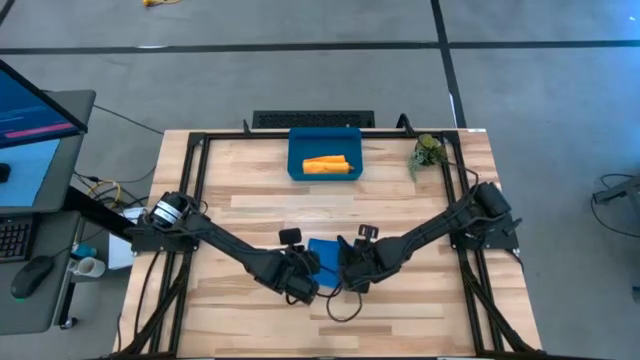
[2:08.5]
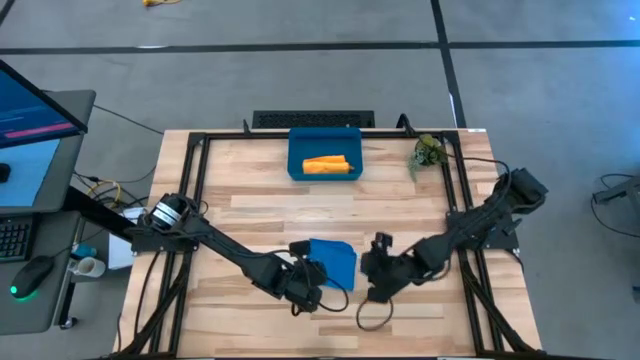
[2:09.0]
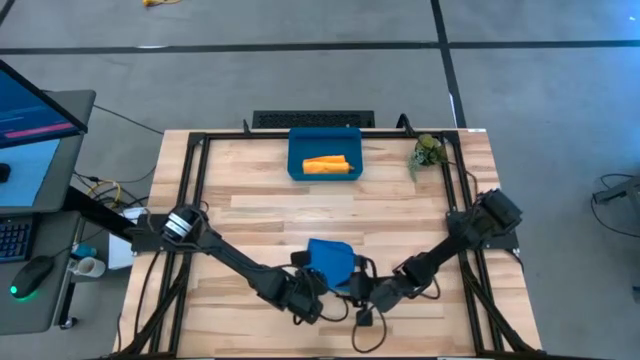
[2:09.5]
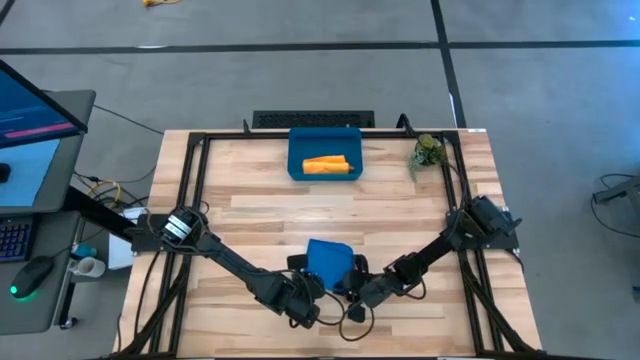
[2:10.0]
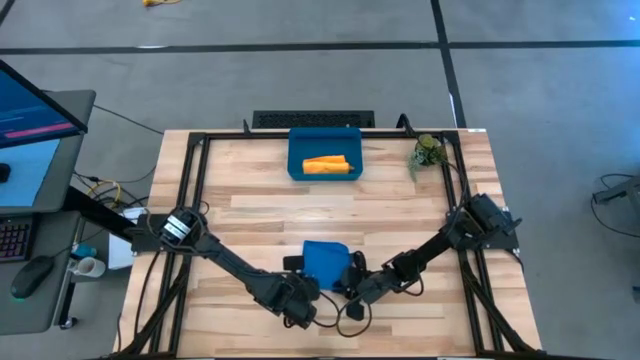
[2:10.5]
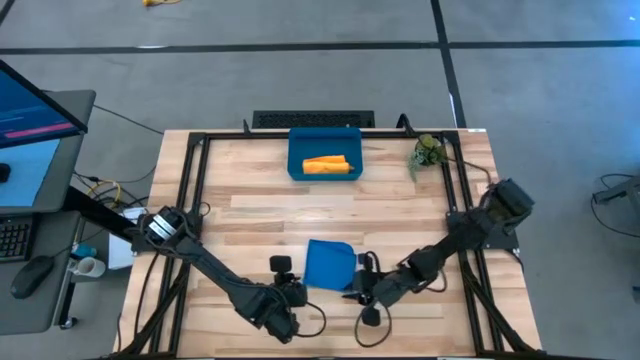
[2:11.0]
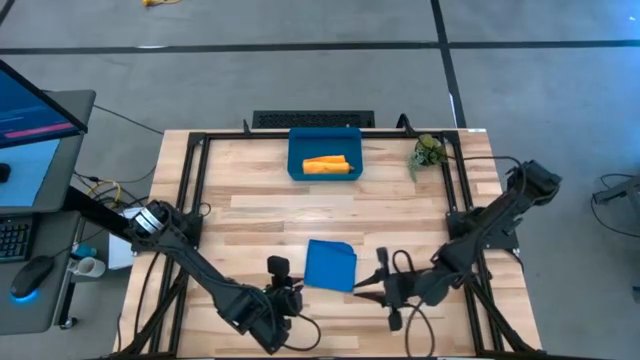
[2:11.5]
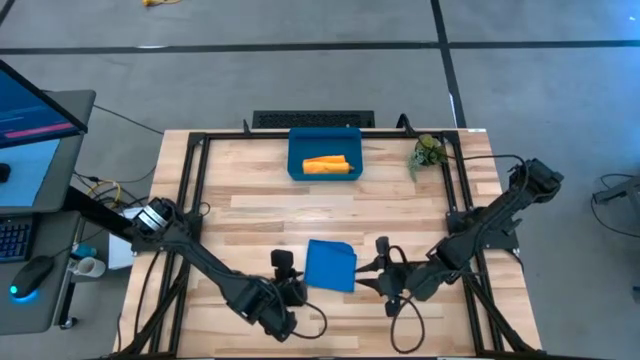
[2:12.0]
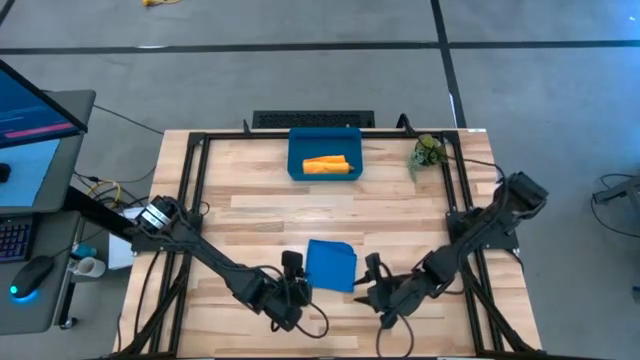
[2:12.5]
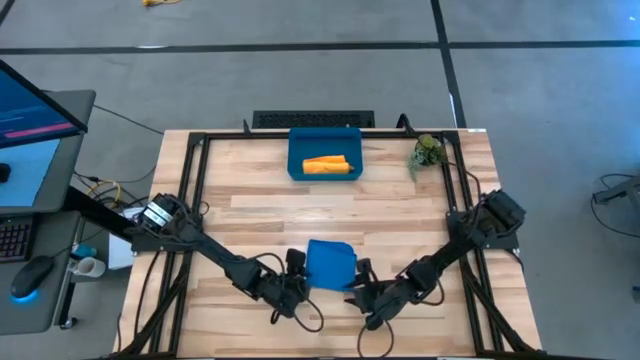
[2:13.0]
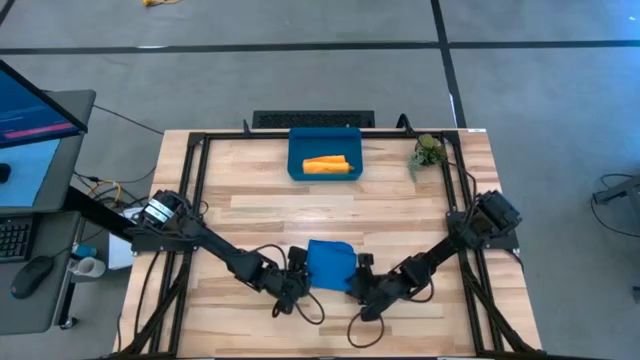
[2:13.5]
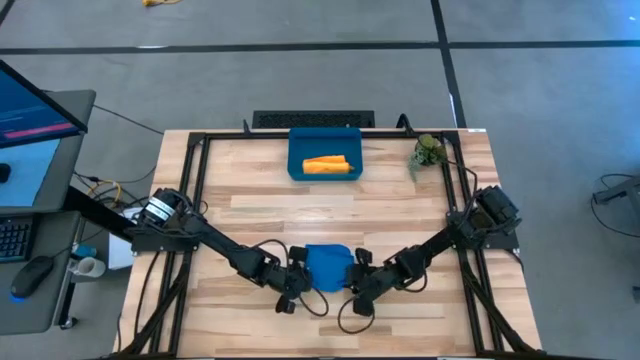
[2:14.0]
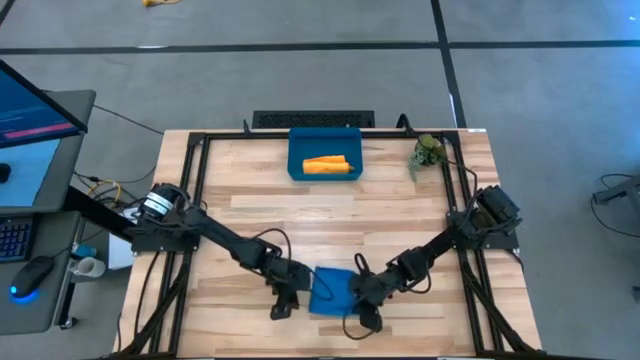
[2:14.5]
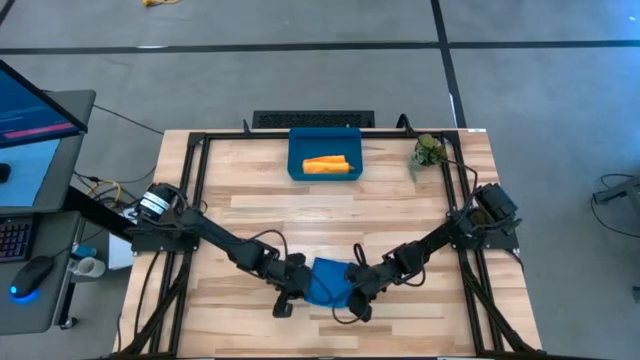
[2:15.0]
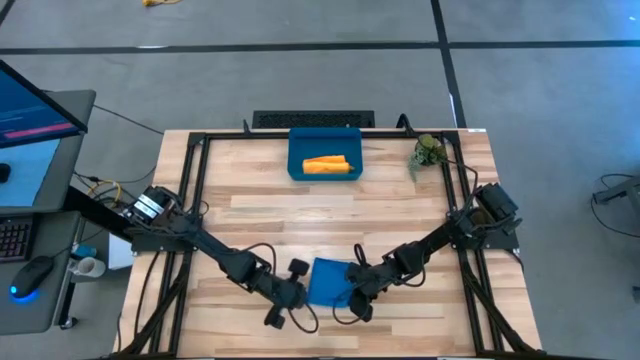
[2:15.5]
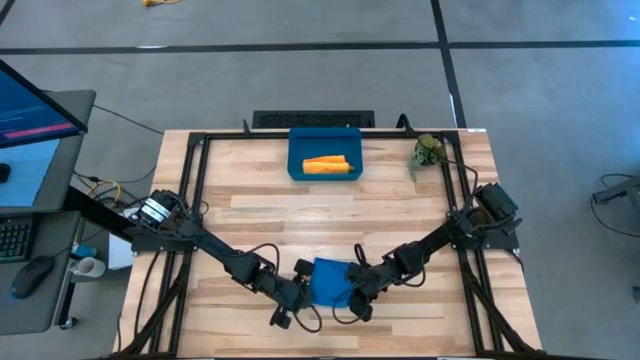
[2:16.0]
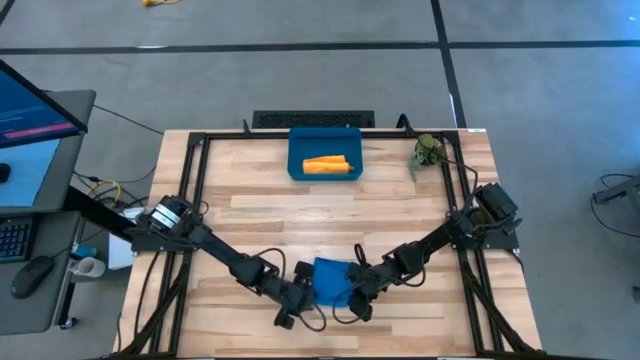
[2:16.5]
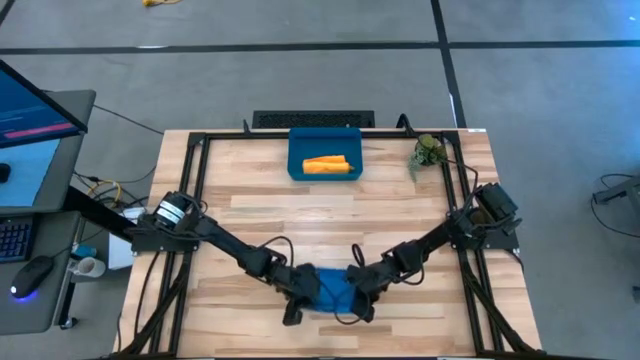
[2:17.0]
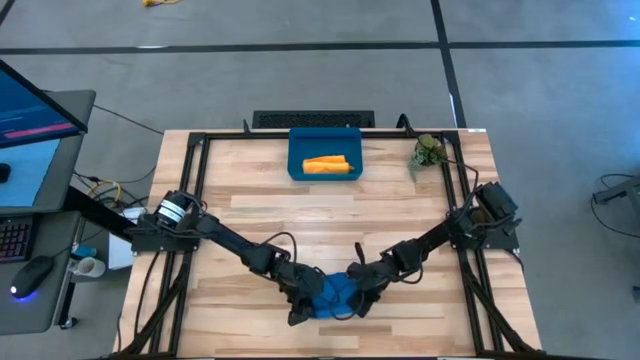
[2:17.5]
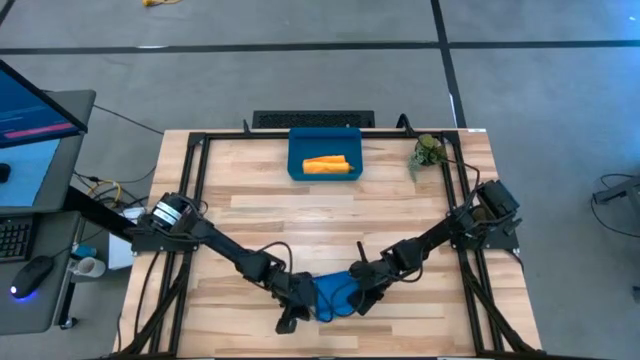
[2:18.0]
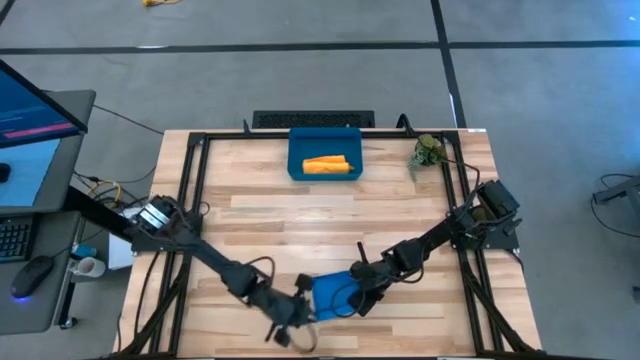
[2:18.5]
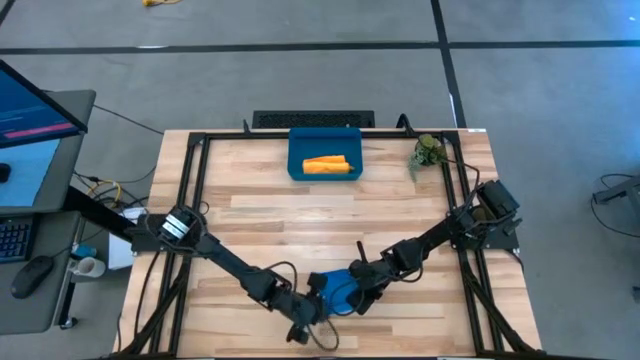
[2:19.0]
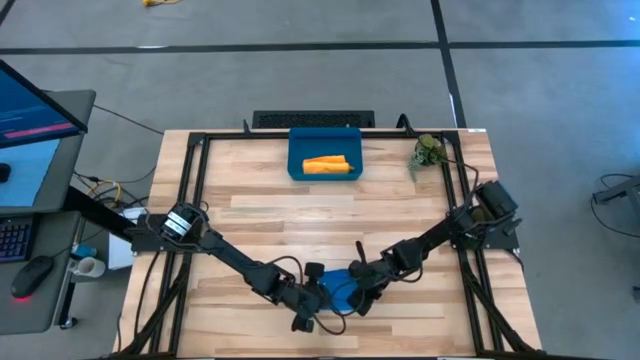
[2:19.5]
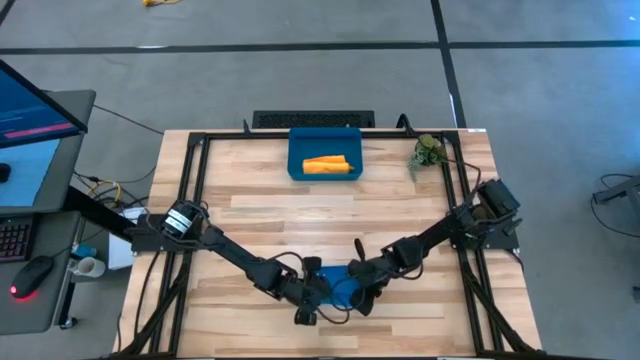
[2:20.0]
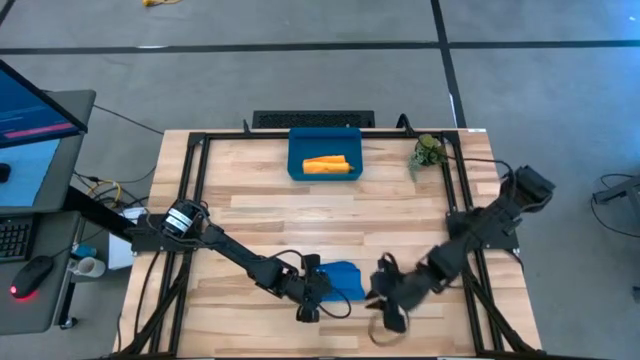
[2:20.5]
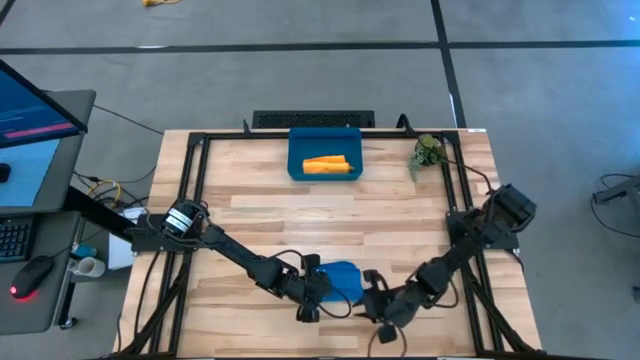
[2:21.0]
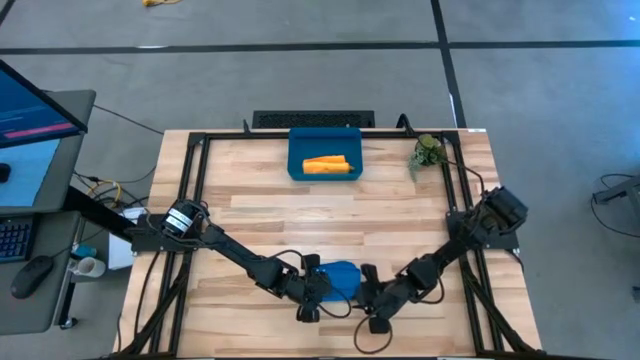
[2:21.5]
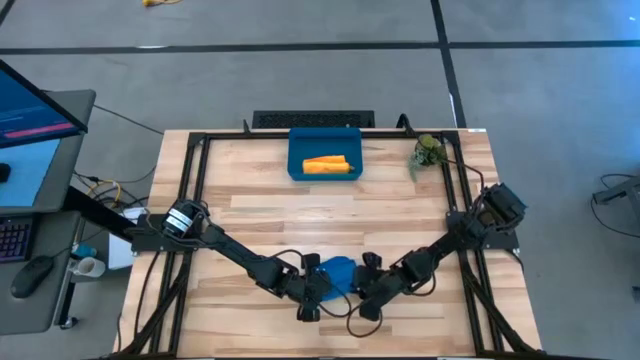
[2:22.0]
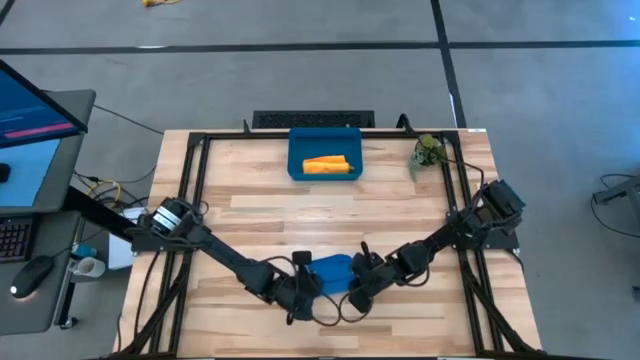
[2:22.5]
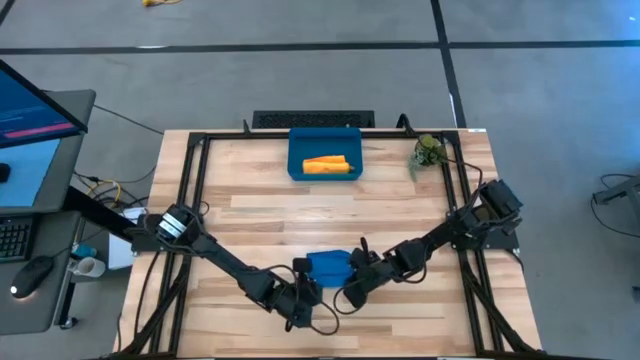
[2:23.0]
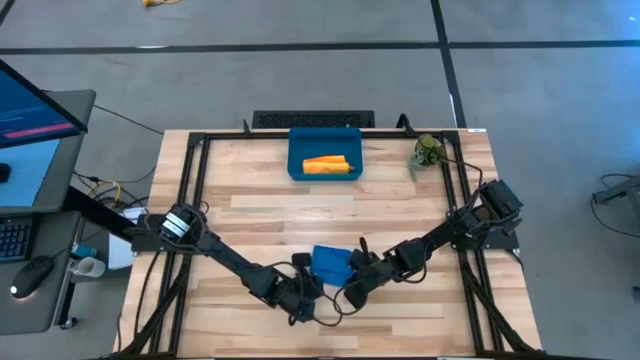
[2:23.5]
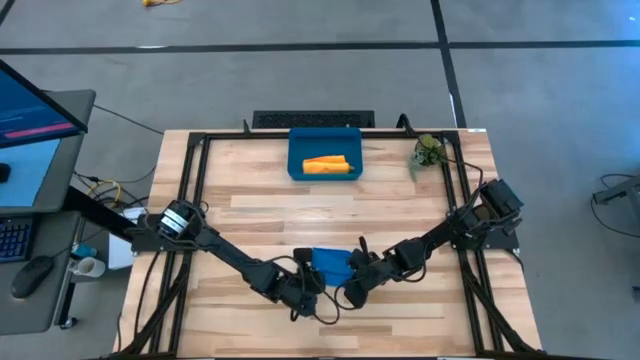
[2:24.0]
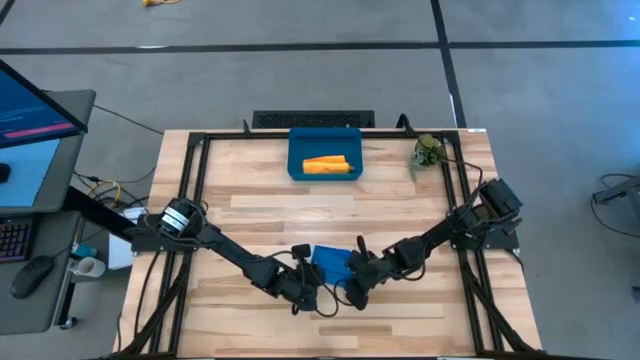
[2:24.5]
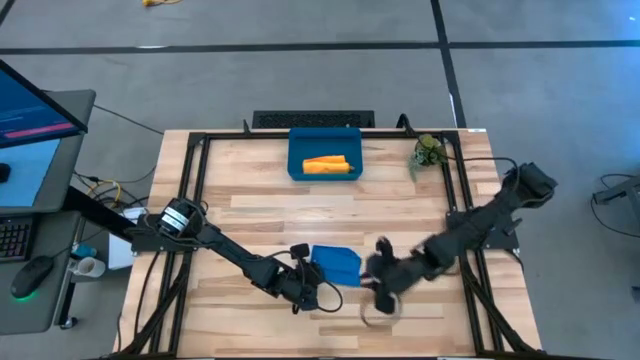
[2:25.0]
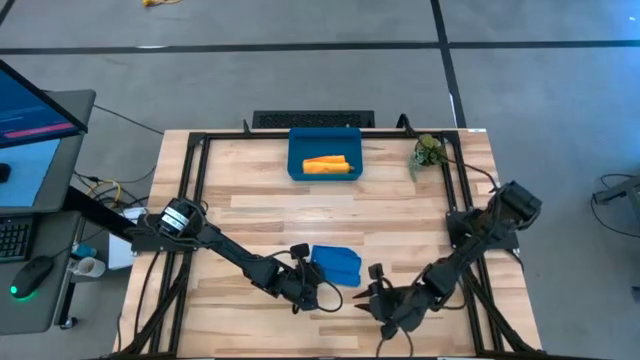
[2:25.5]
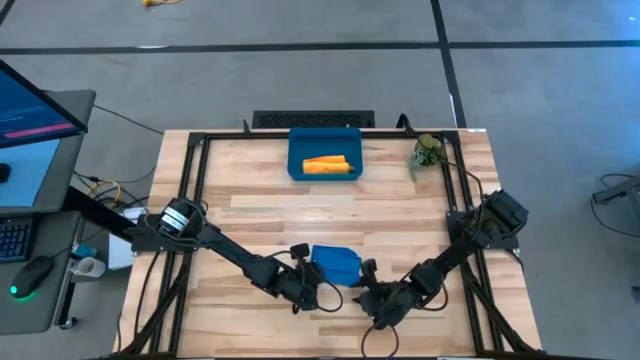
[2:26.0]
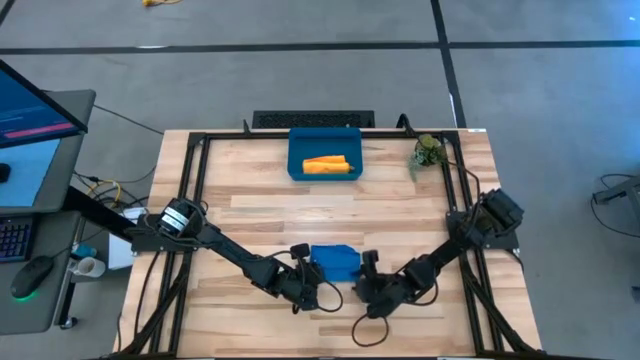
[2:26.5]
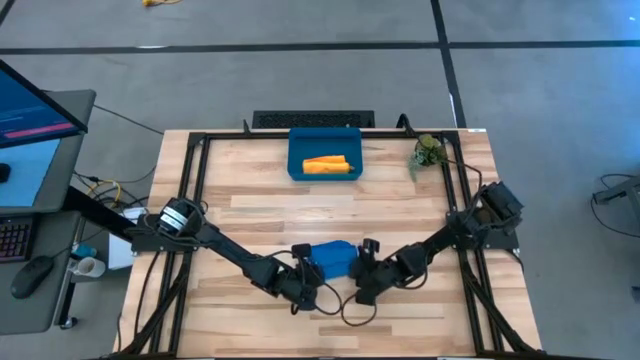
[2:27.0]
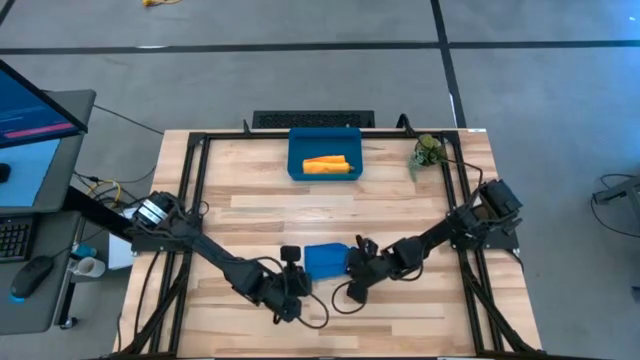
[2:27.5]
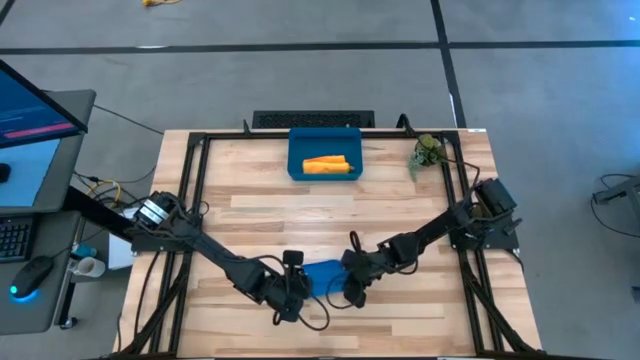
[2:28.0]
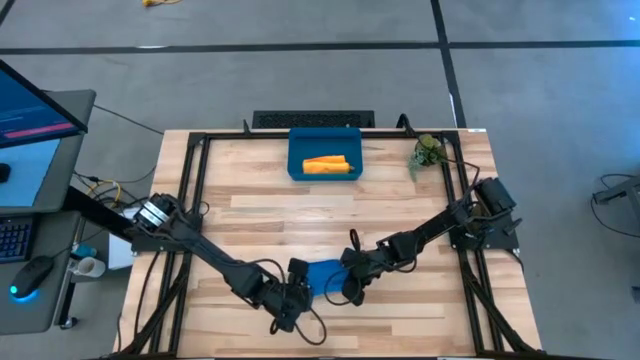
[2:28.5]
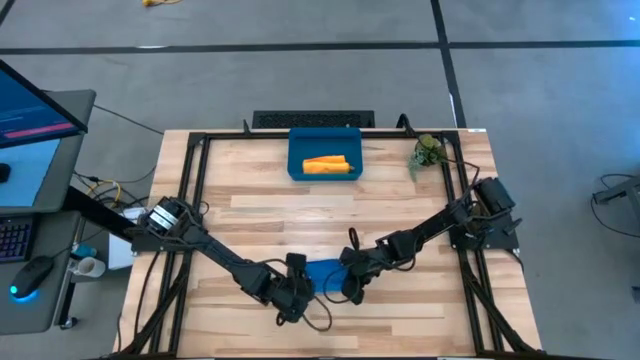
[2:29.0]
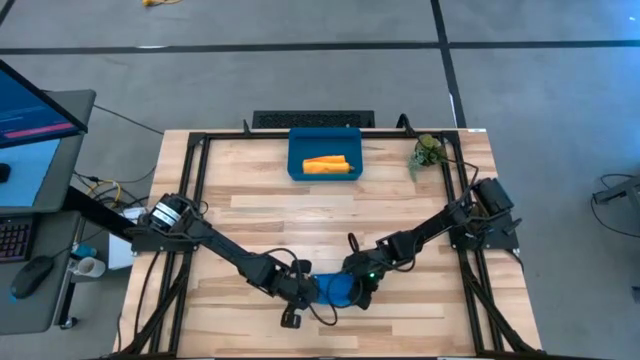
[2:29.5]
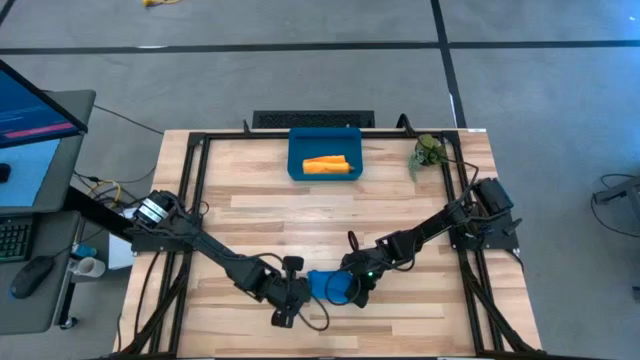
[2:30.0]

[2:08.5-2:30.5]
Task: Roll microfiber towels into tight, uniform cylinder then place into a basket
Roll the blue microfiber towel
